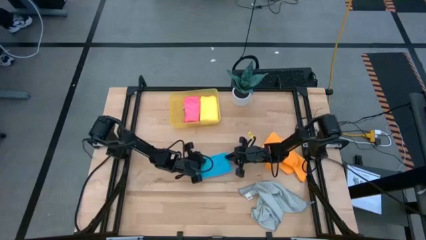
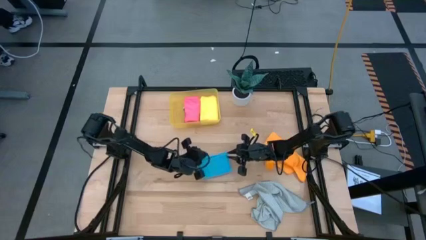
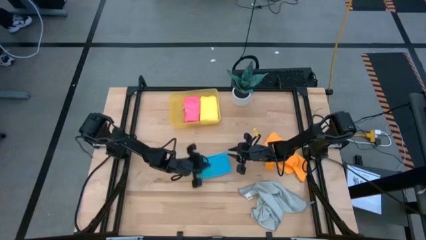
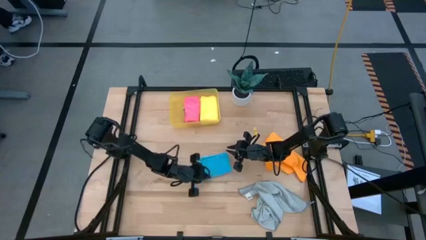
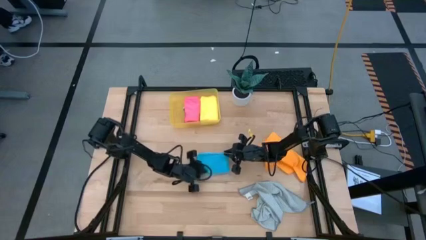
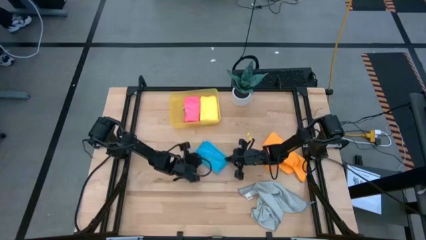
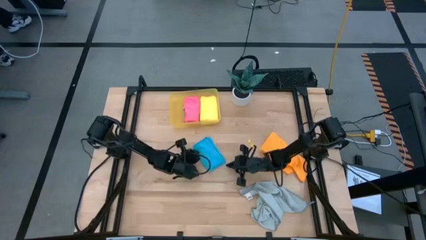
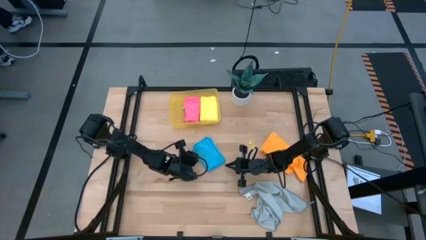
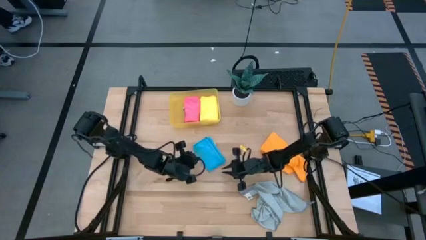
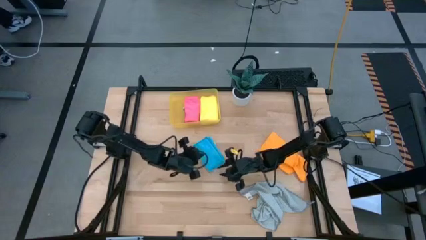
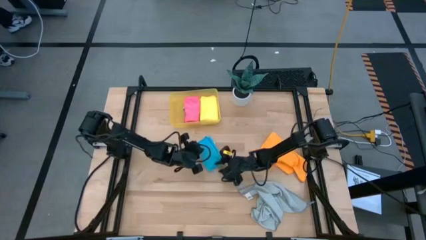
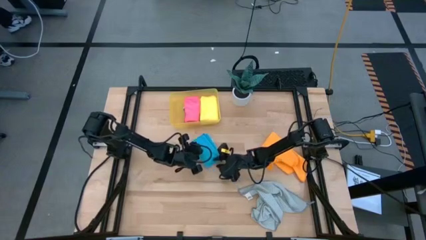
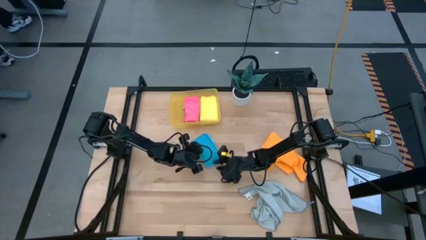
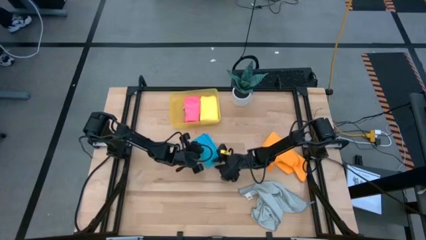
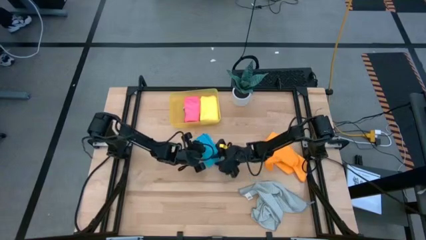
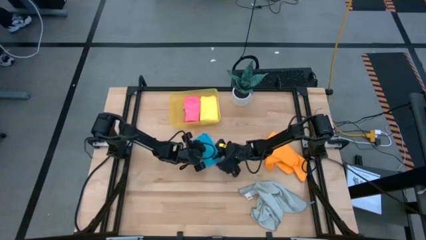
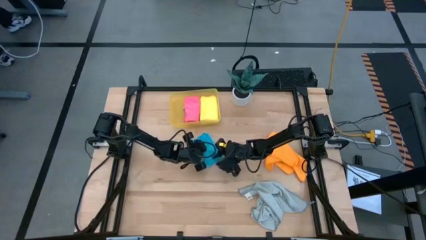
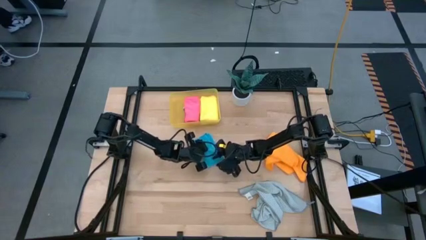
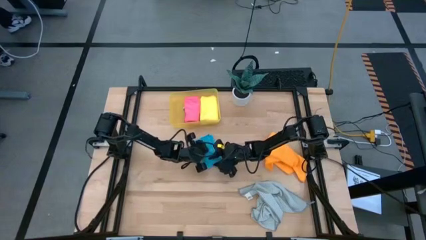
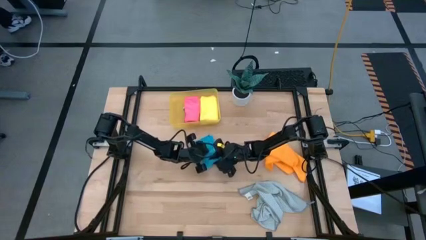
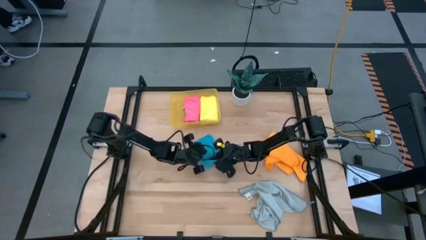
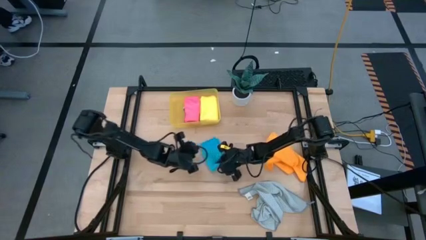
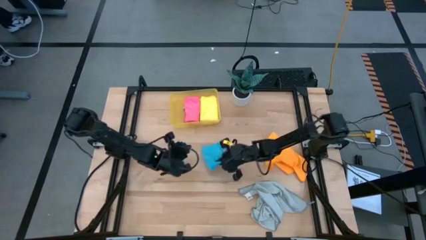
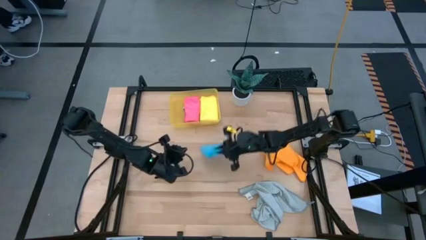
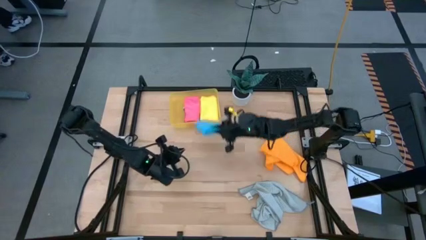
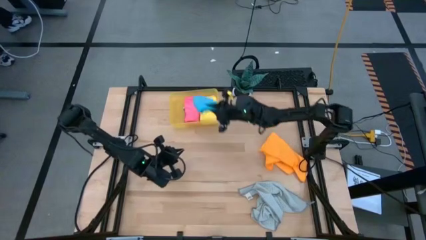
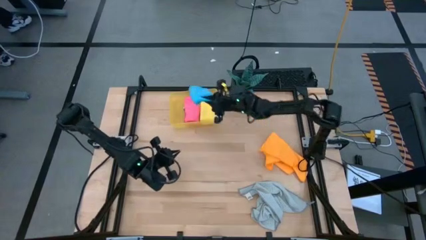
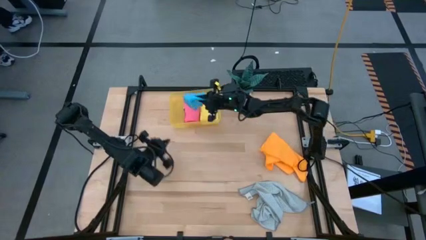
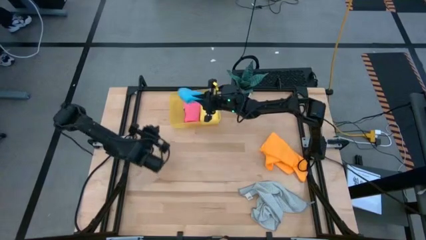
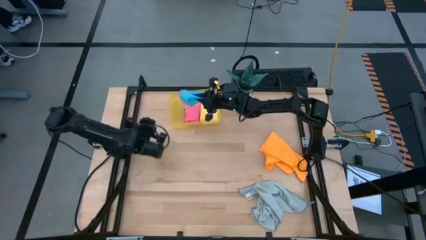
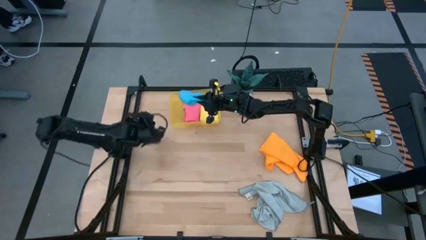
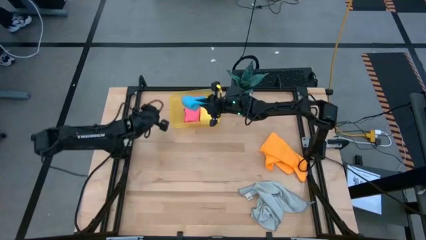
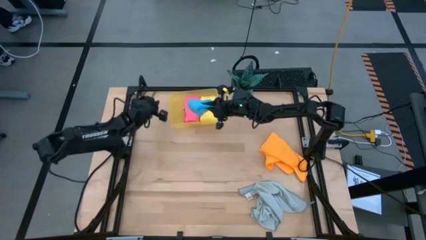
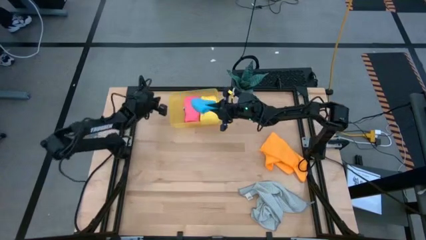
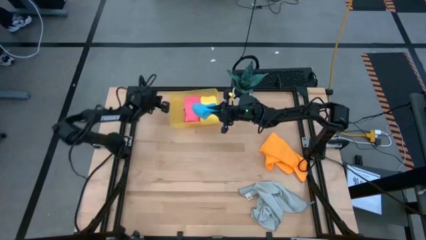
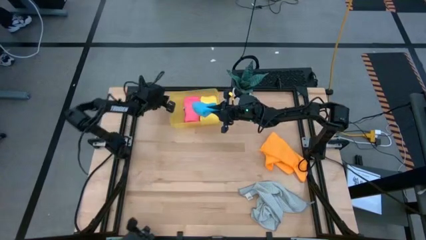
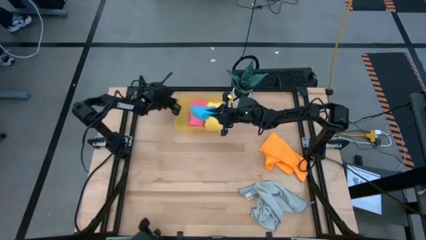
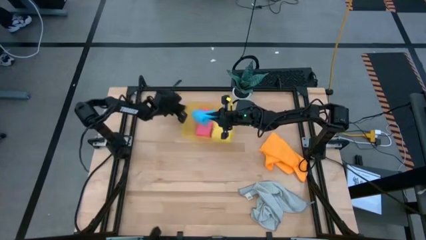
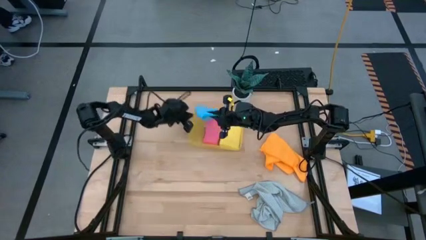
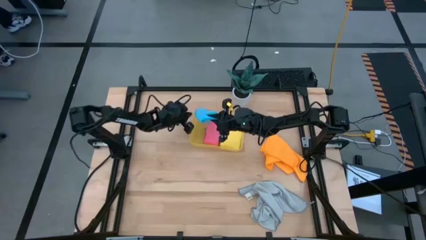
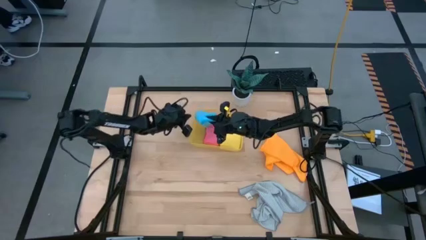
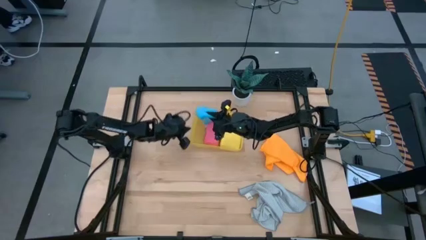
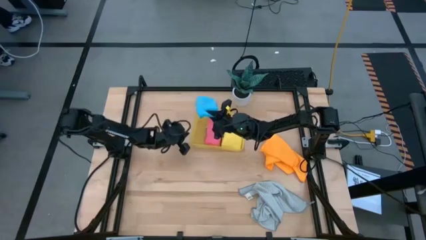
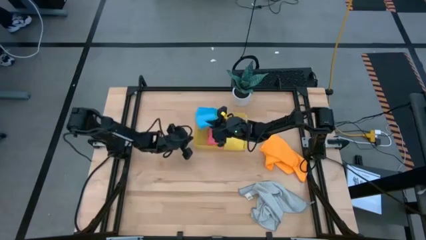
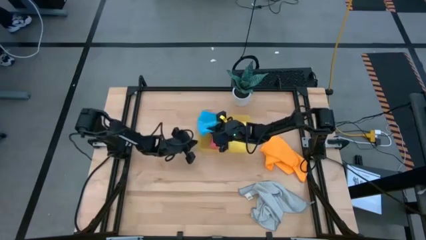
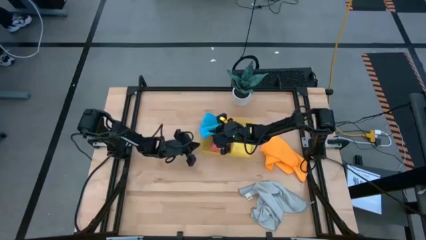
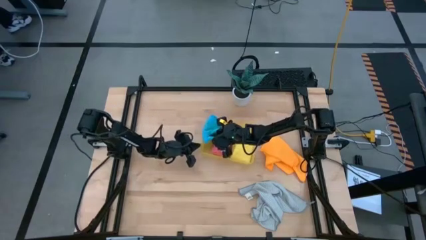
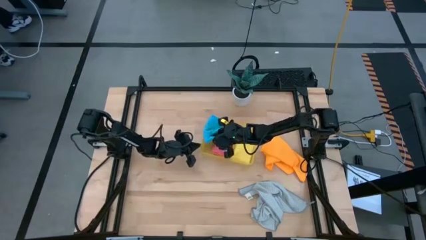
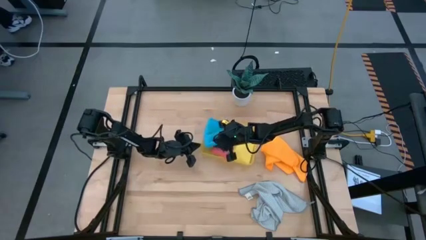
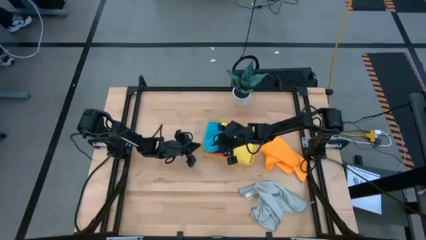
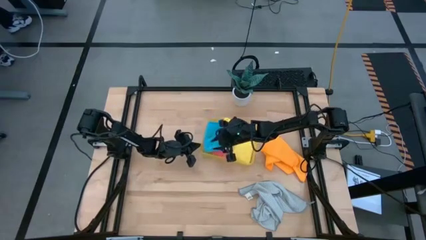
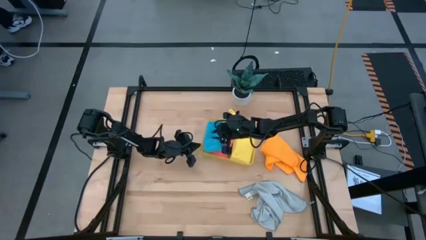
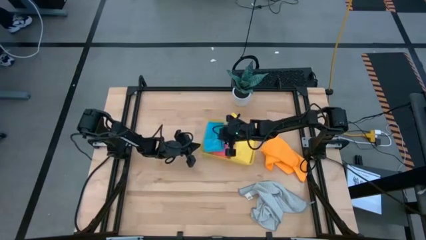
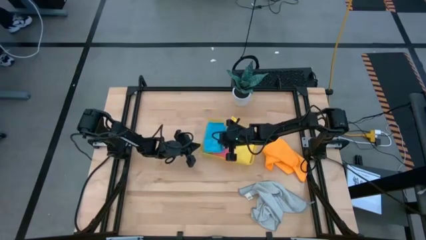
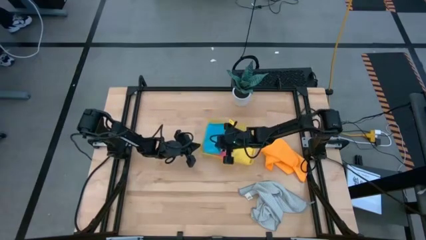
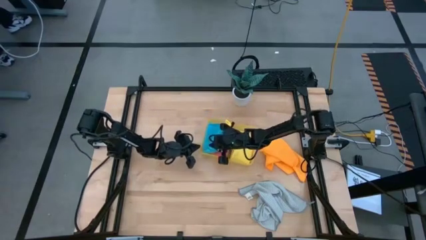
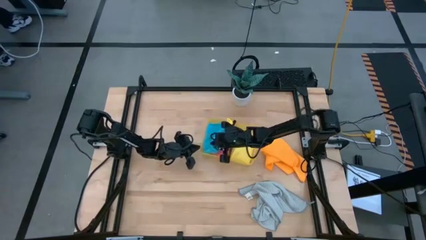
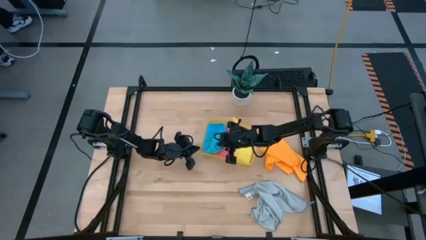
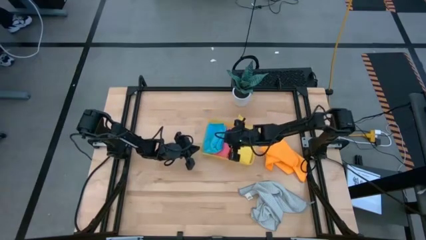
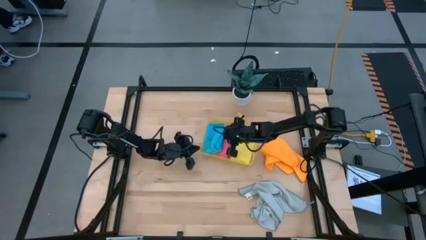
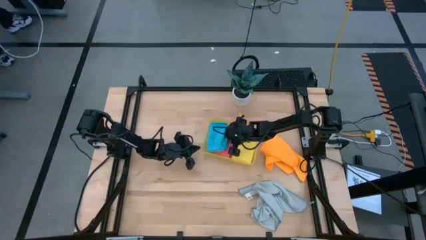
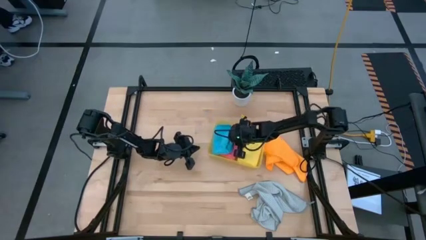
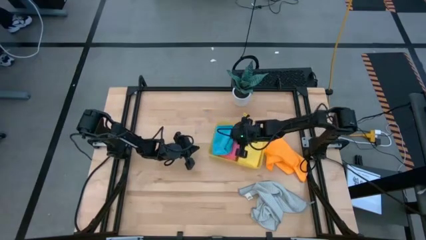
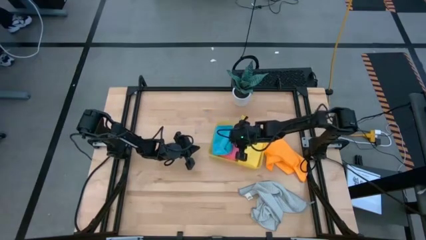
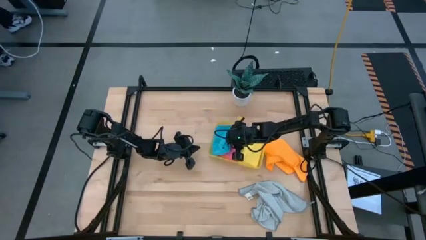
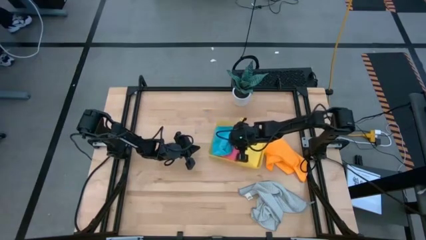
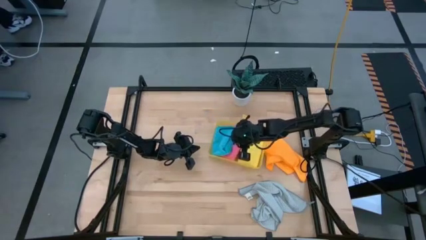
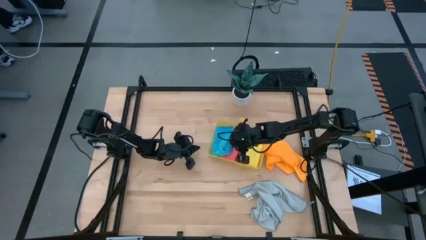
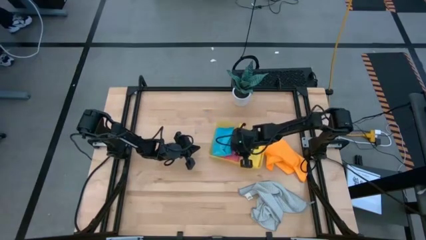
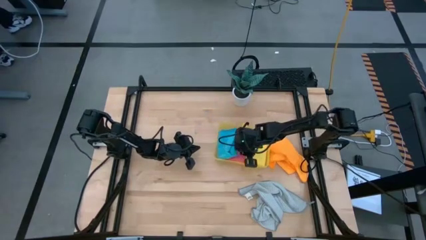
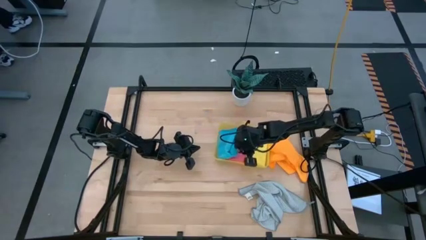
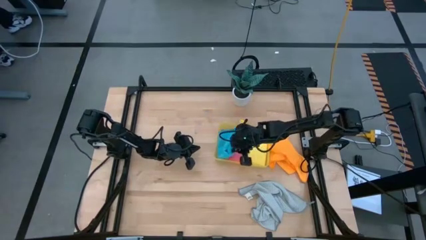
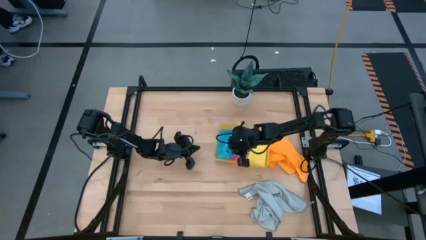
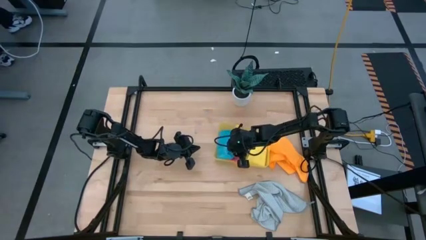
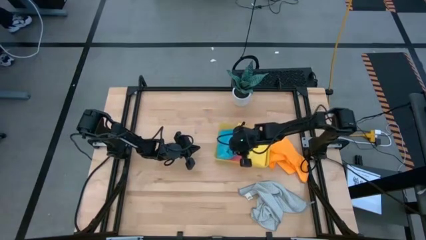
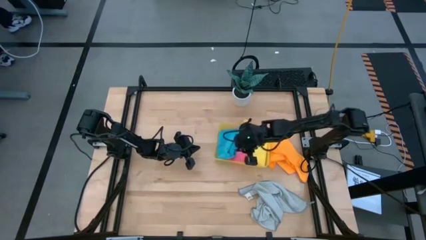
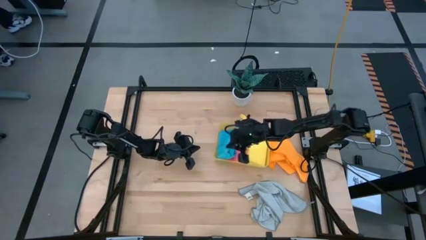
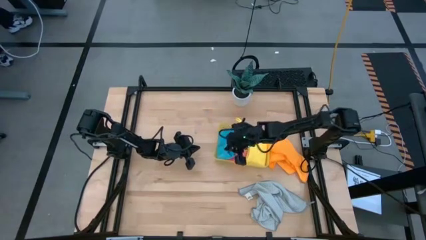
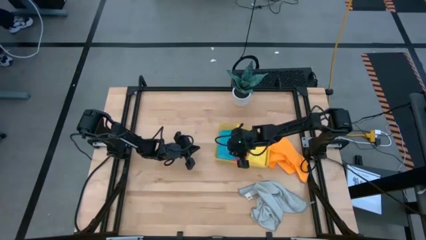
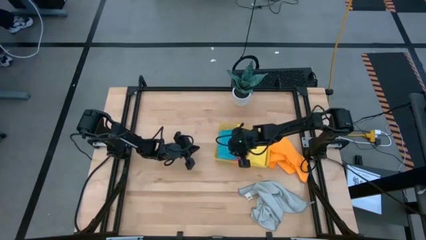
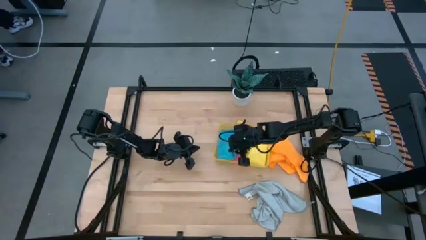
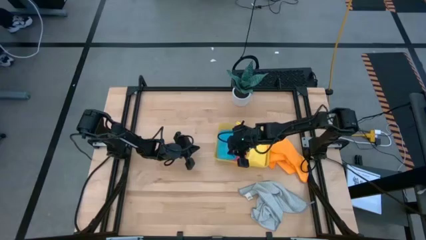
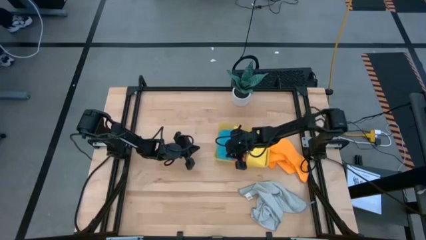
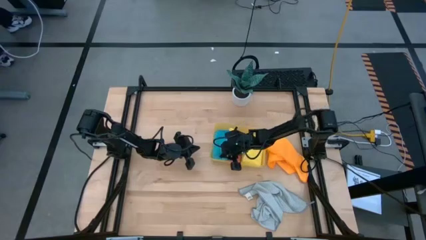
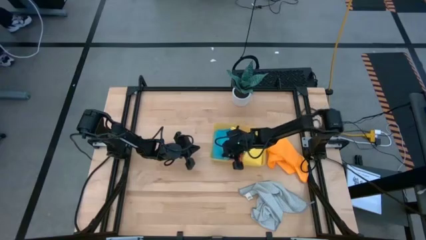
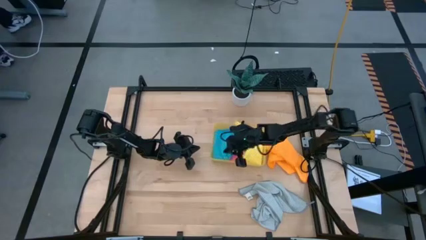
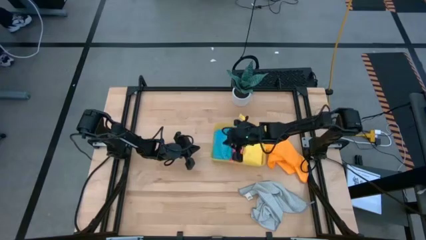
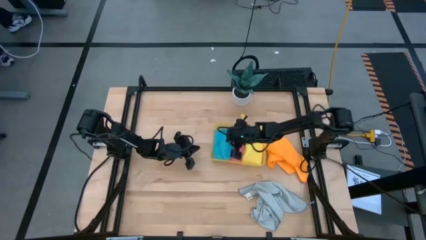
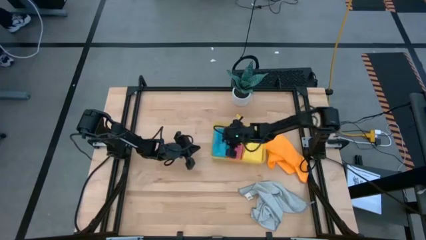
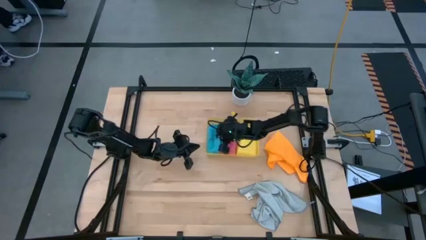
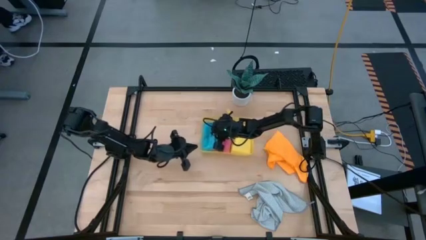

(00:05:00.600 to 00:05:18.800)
Task: Fold microfiber towels
Put the blue microfiber cloth into the yellow bin
